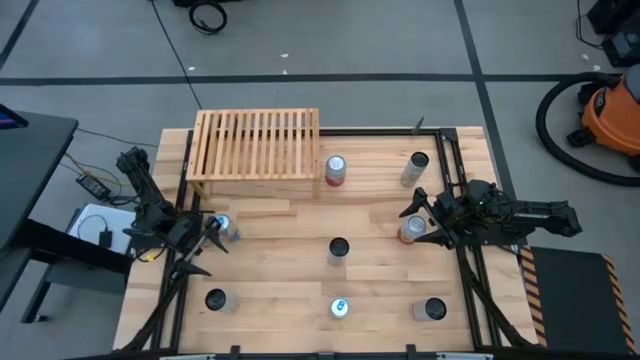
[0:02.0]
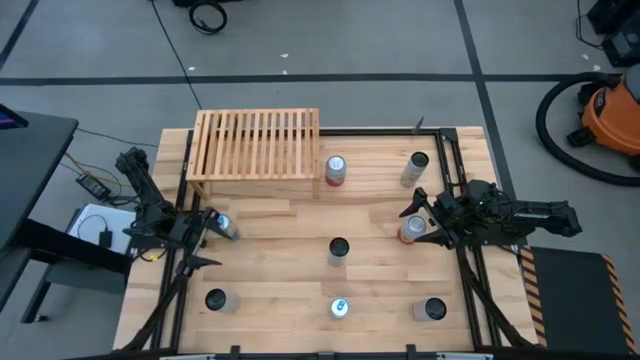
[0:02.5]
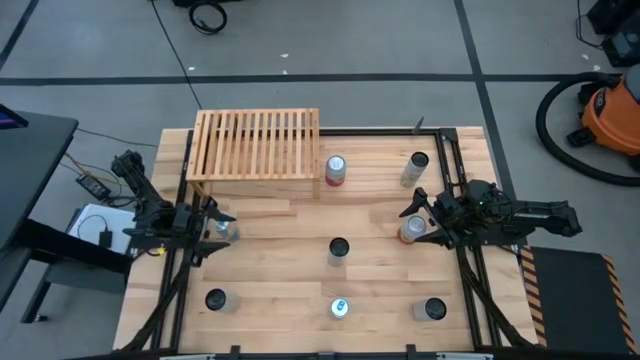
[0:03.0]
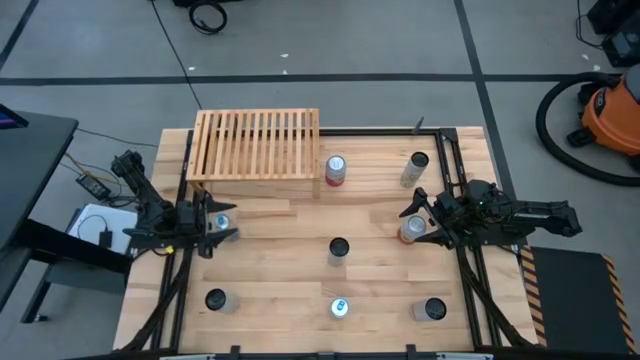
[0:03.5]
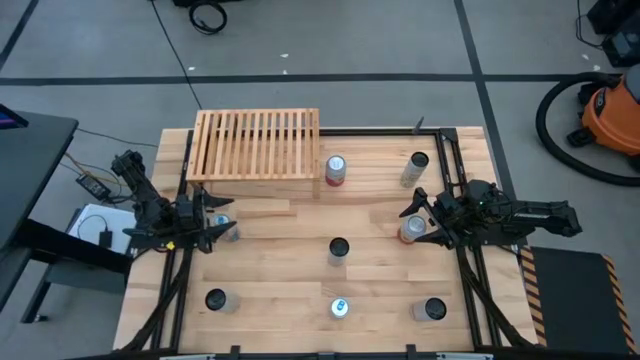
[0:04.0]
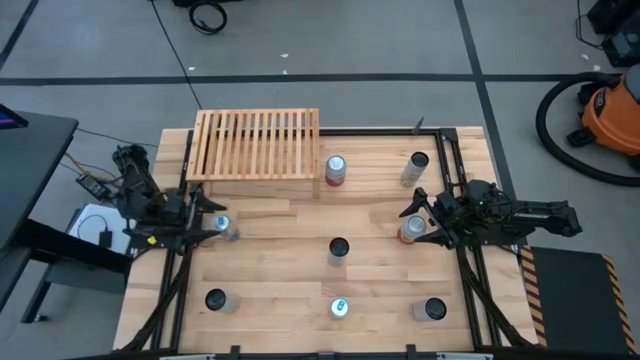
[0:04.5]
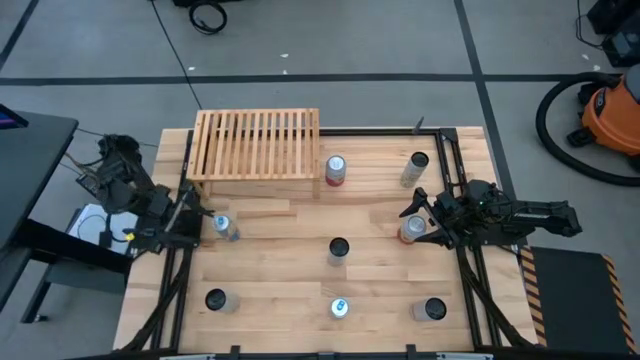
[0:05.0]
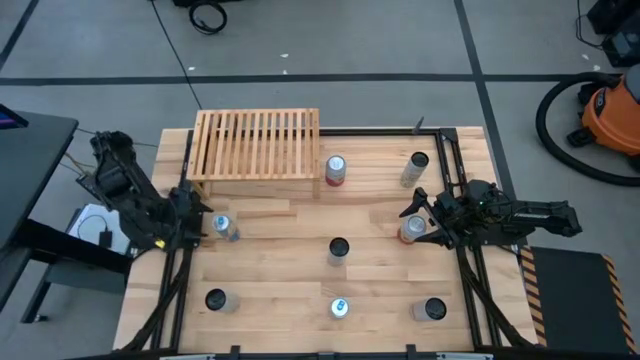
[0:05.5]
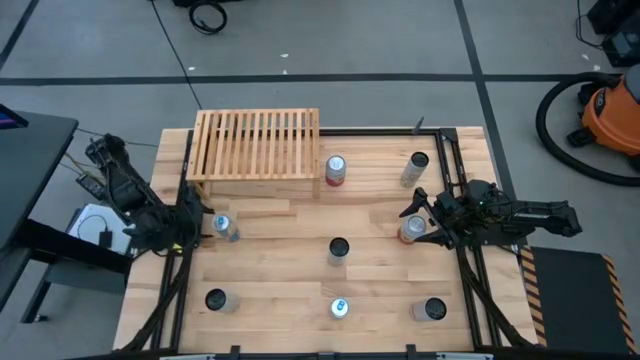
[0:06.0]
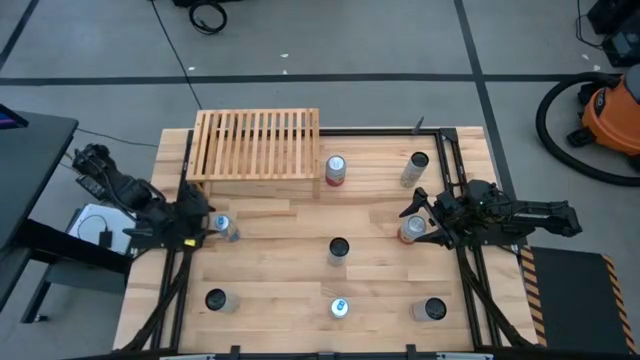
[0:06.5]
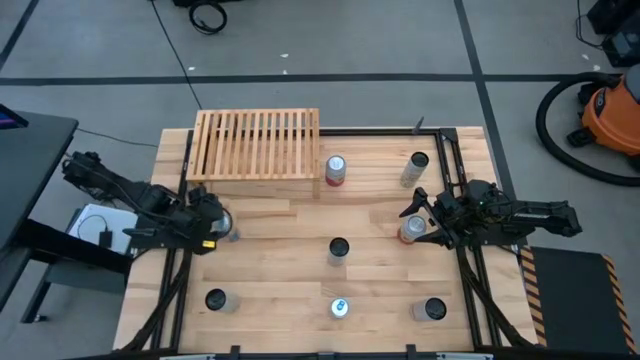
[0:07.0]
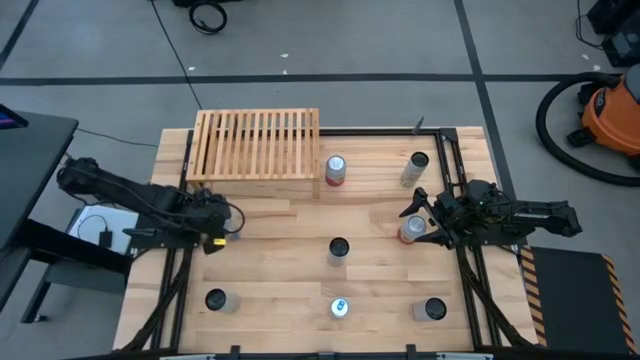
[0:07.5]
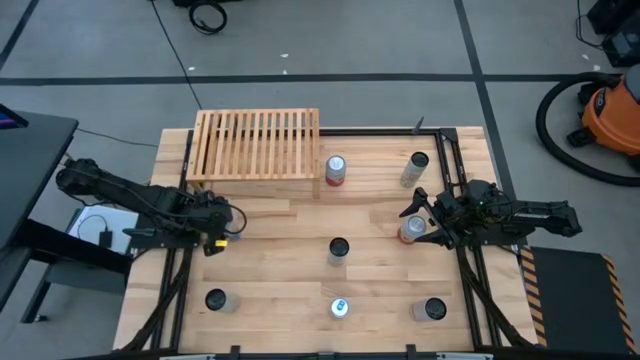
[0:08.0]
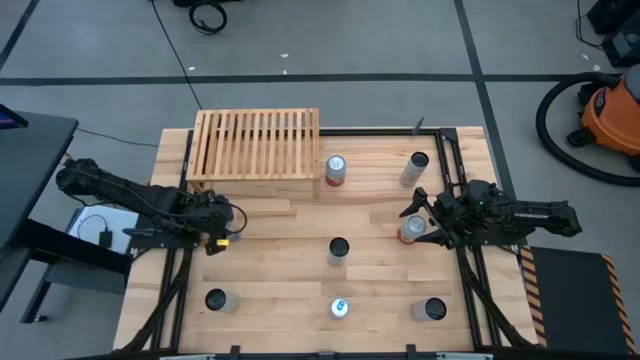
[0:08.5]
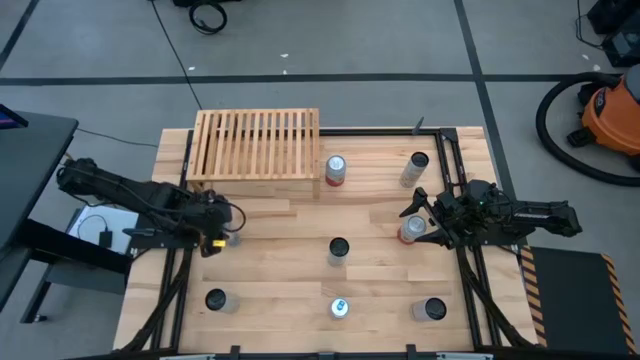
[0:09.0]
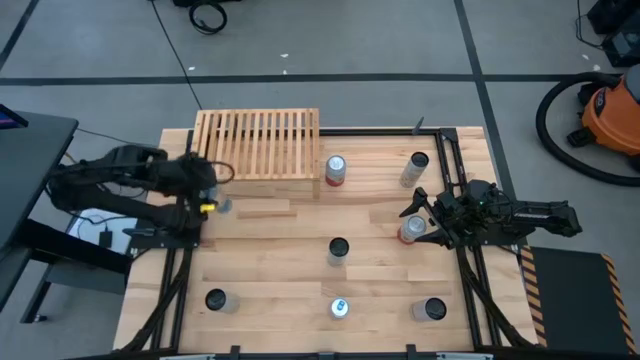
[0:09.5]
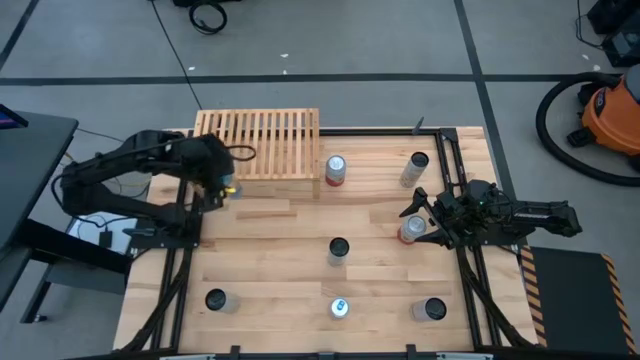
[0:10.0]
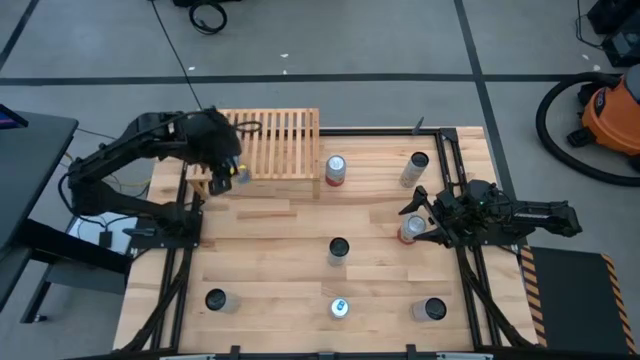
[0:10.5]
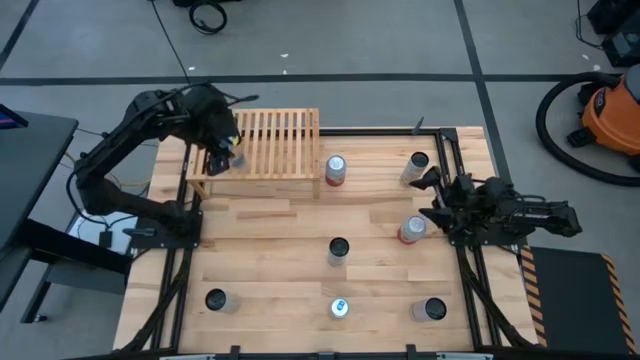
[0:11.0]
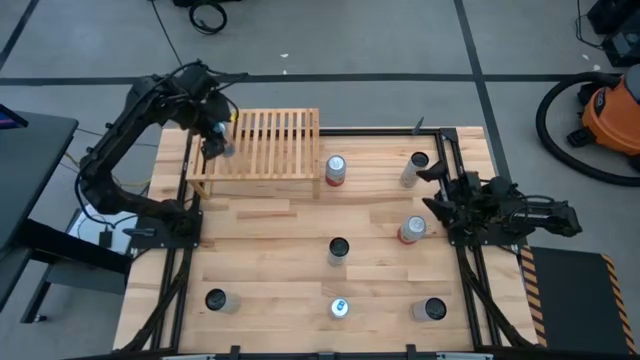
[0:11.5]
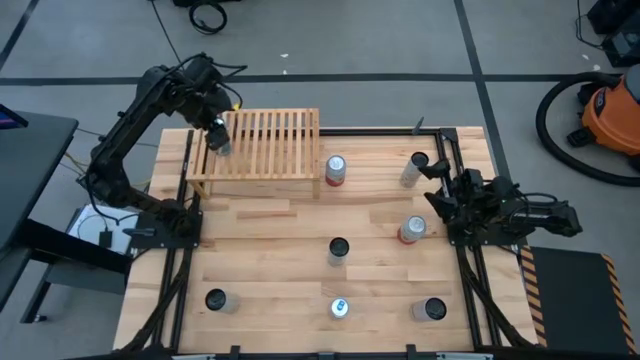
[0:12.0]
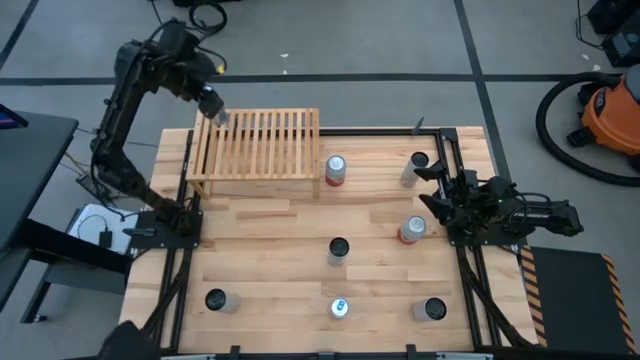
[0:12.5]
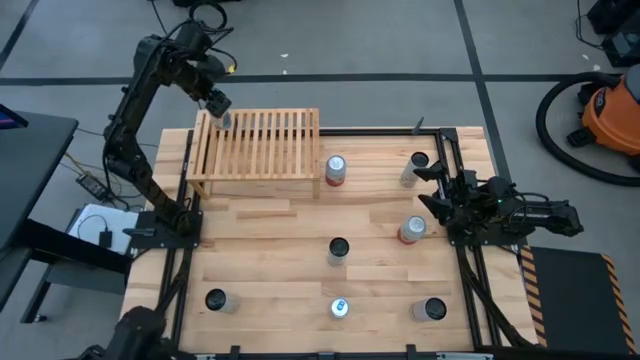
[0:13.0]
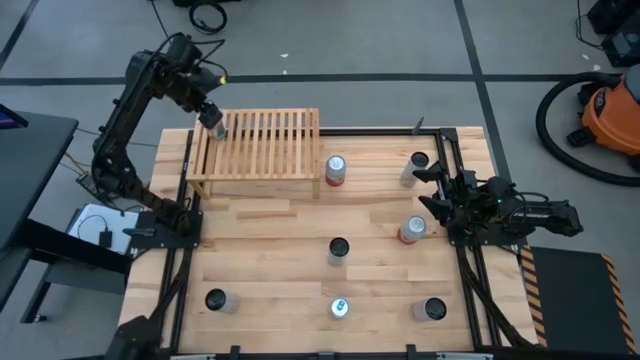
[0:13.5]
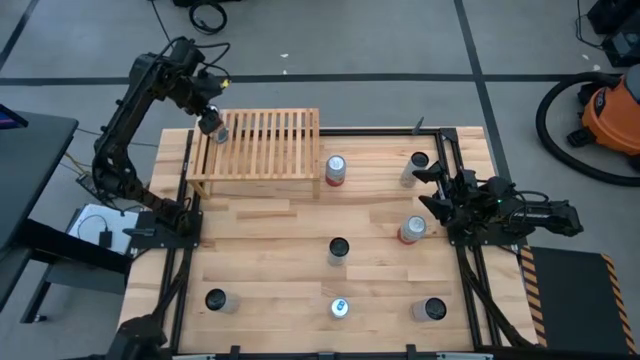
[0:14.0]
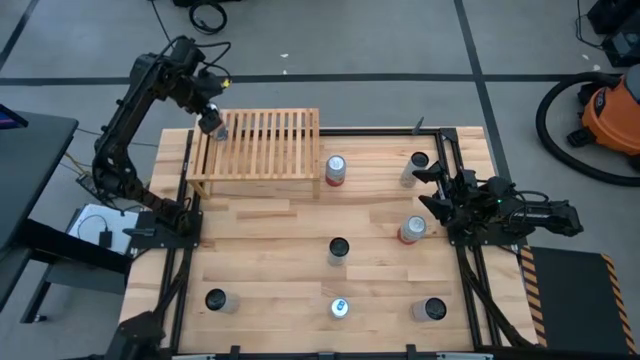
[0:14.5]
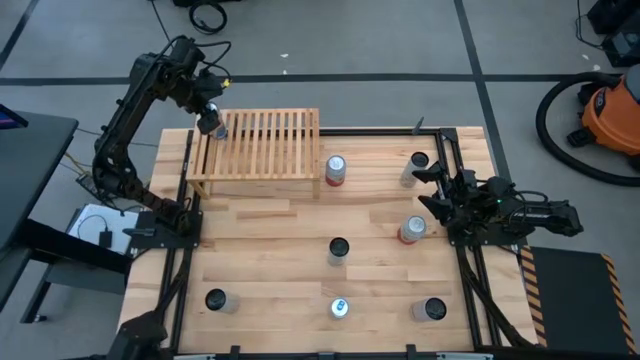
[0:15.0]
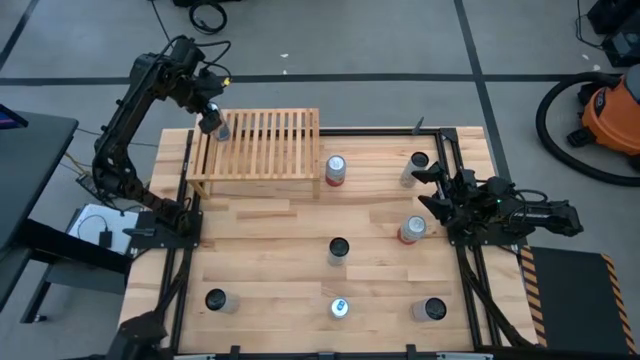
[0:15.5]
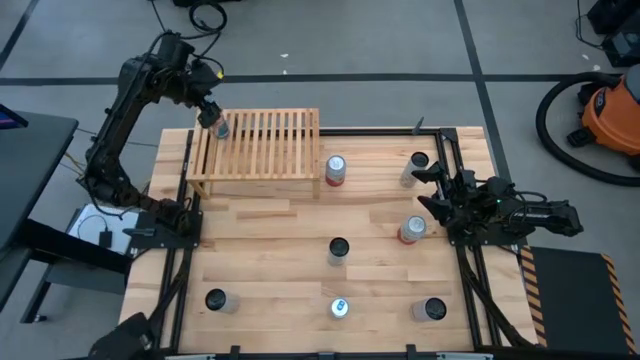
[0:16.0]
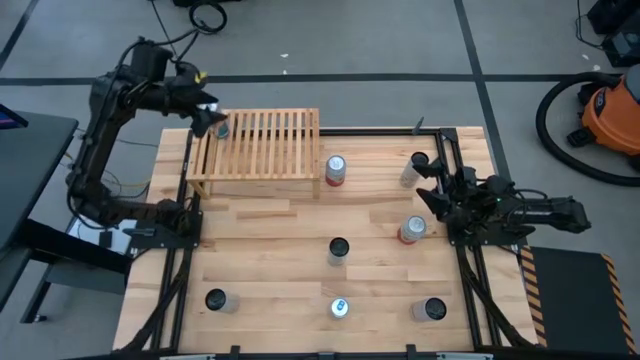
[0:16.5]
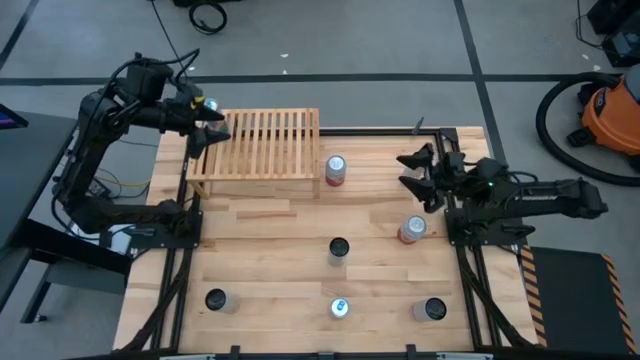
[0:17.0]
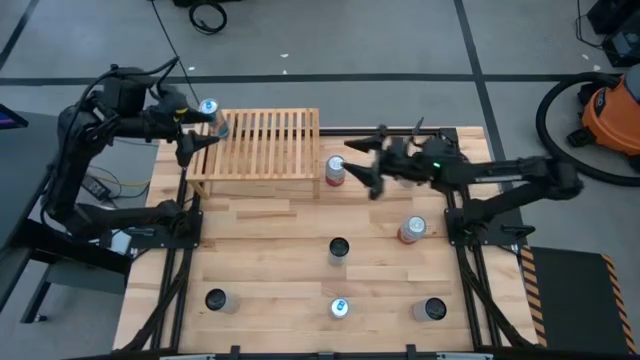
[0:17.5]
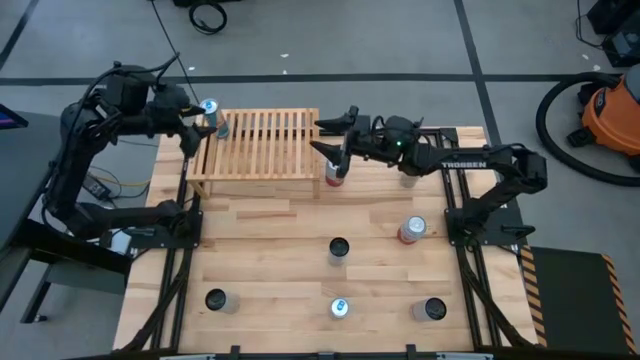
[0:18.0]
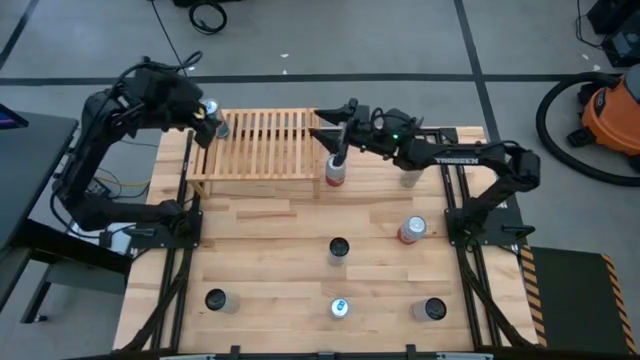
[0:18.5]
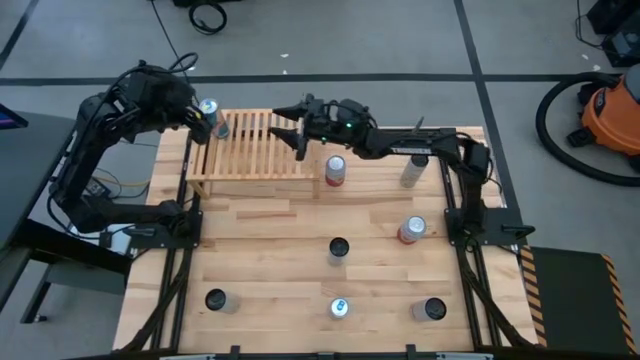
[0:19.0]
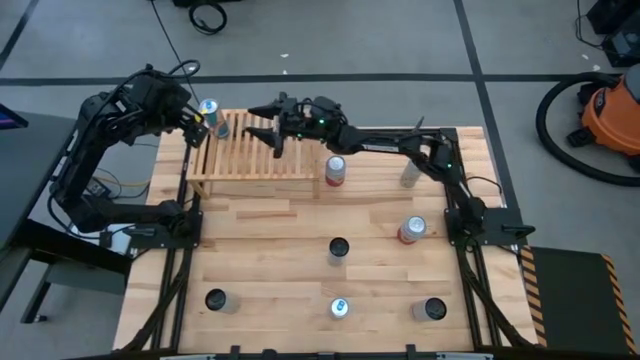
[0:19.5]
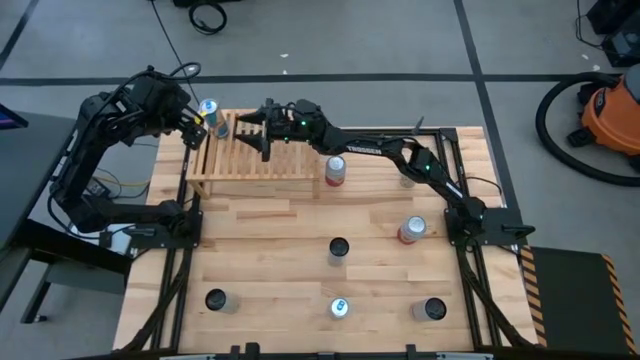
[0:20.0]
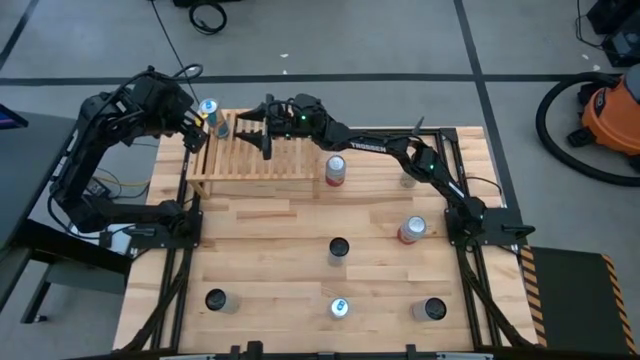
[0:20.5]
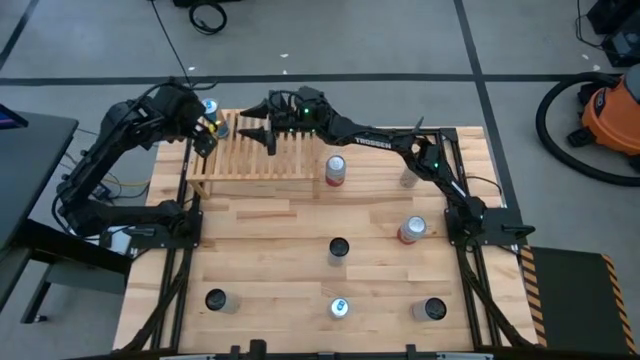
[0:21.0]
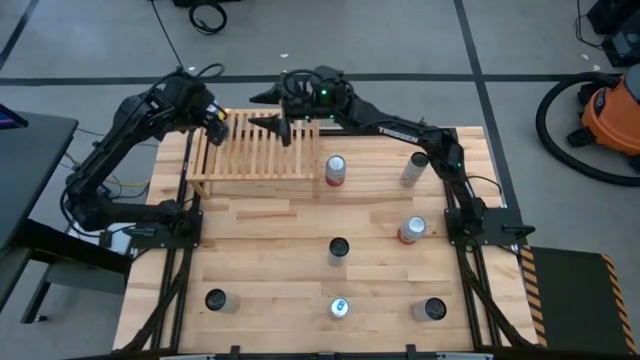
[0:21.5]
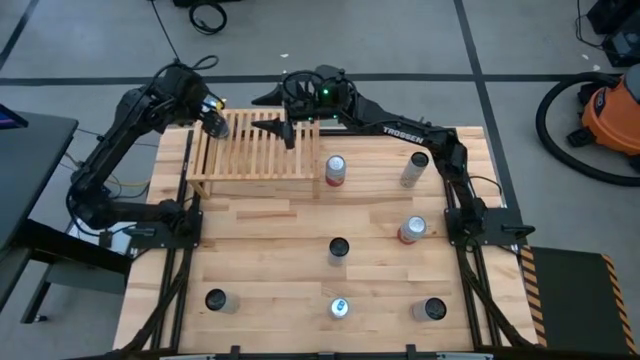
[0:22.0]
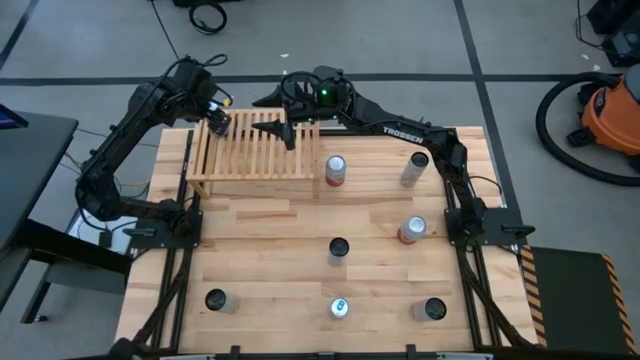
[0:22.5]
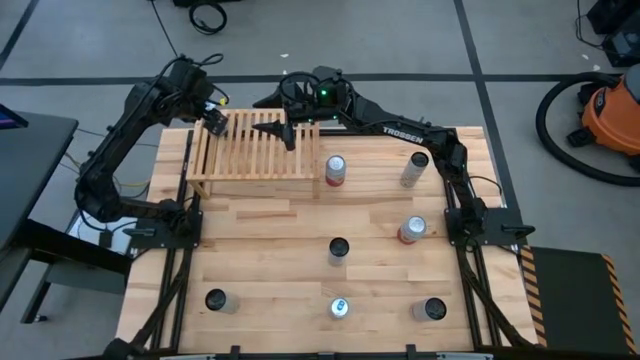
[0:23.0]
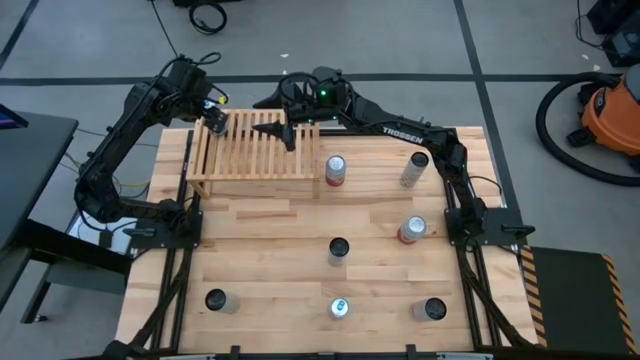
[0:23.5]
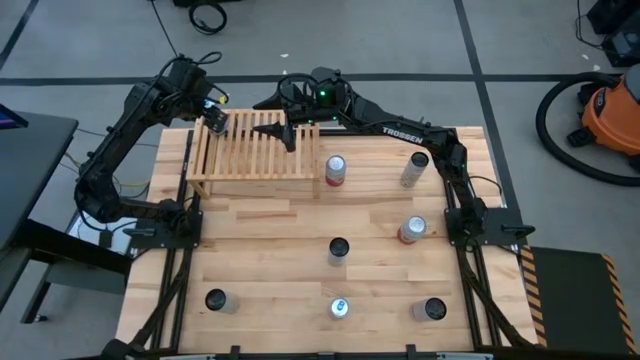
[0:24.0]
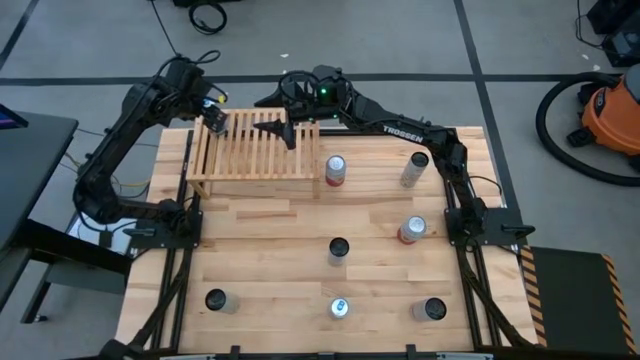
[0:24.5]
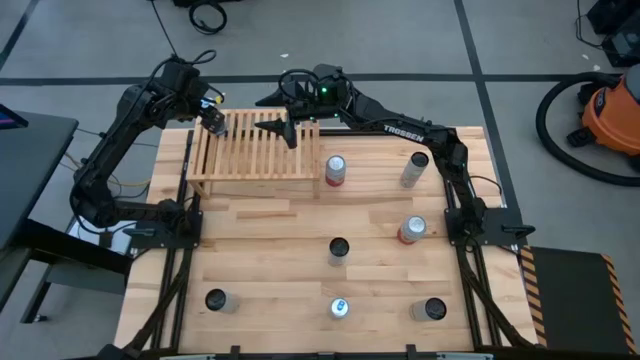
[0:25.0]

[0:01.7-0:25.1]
Task: Place canned beverage on shelf
Put the left blue soda can on the shelf
